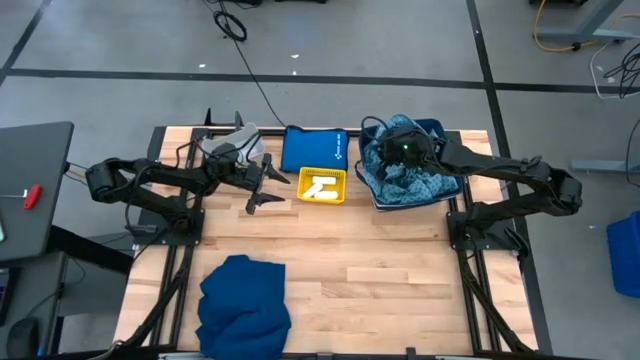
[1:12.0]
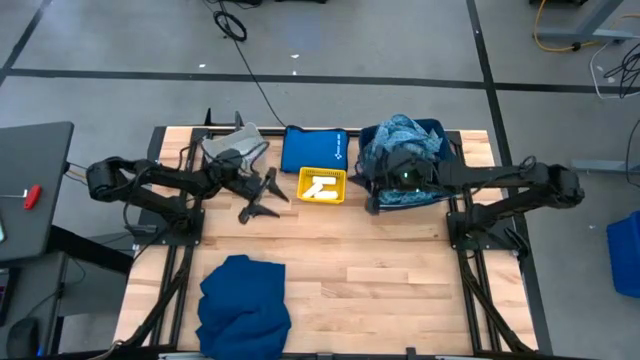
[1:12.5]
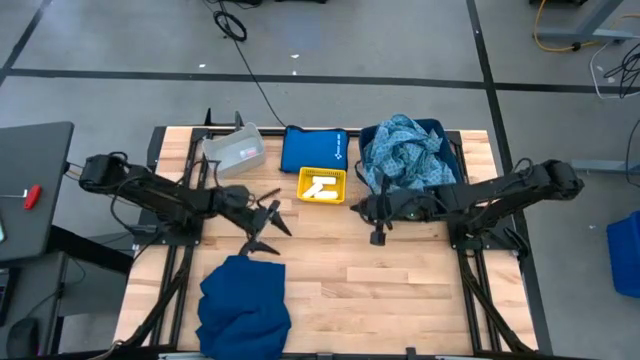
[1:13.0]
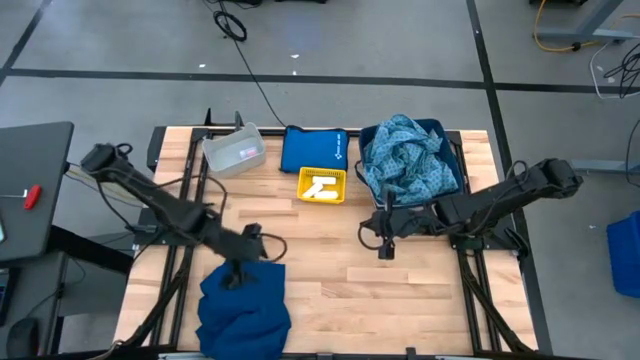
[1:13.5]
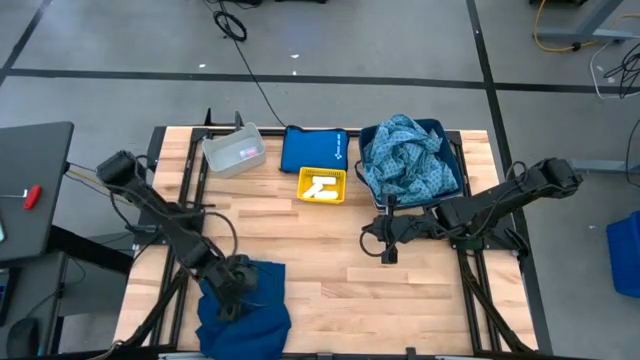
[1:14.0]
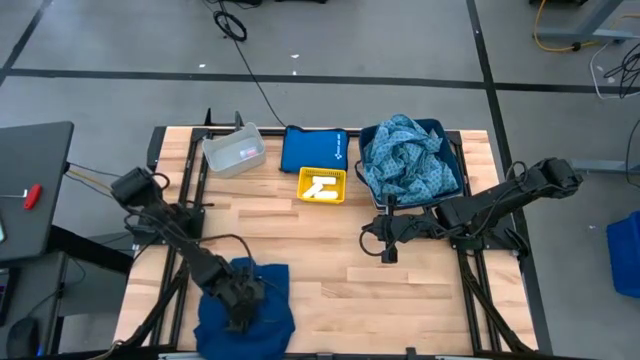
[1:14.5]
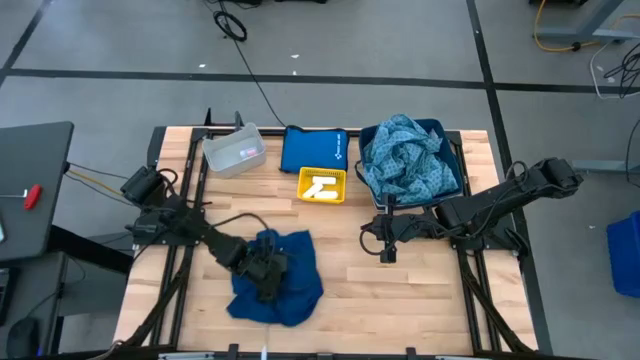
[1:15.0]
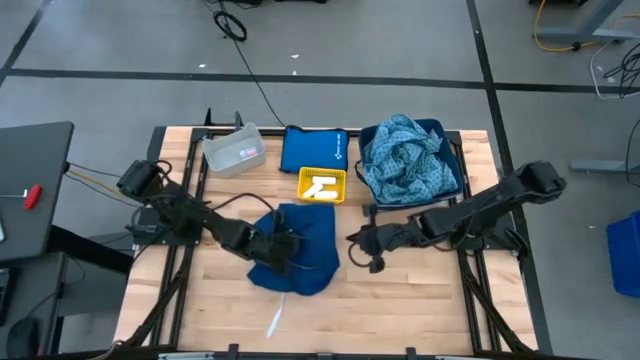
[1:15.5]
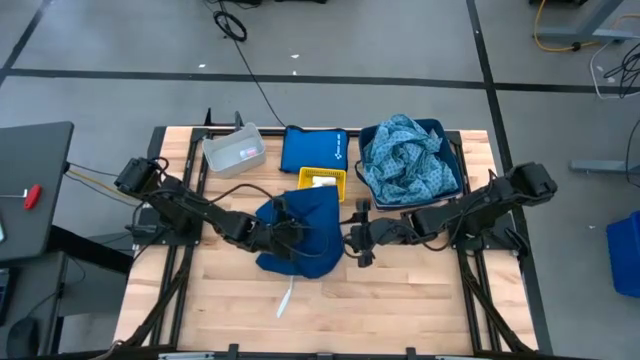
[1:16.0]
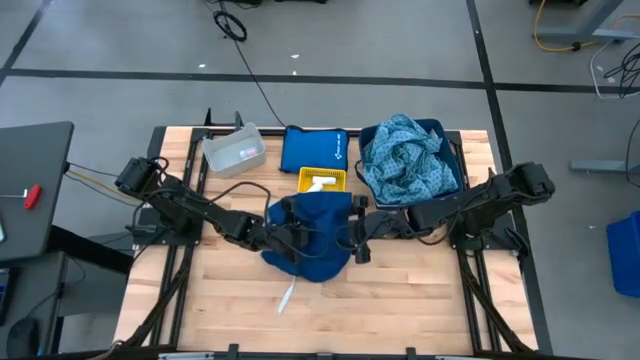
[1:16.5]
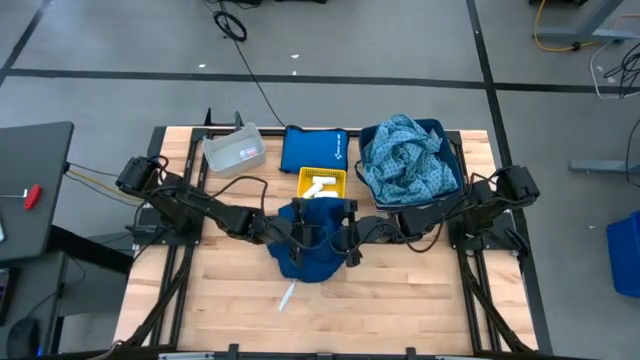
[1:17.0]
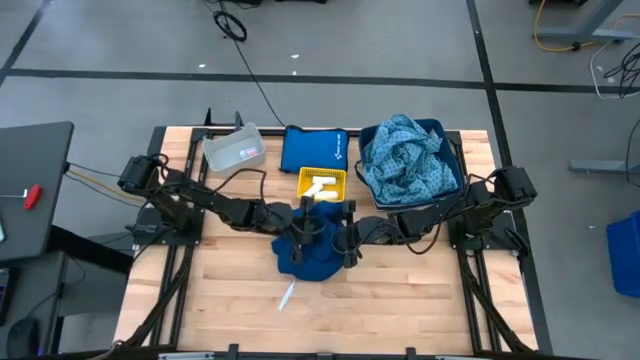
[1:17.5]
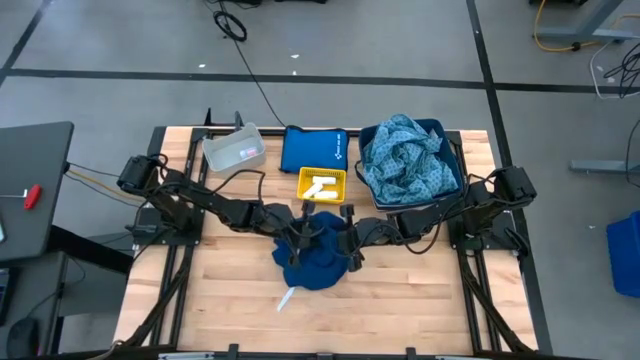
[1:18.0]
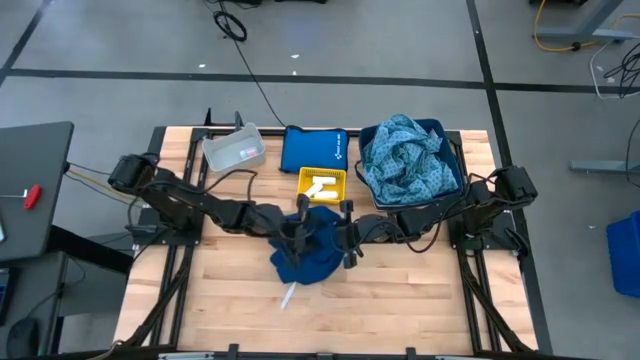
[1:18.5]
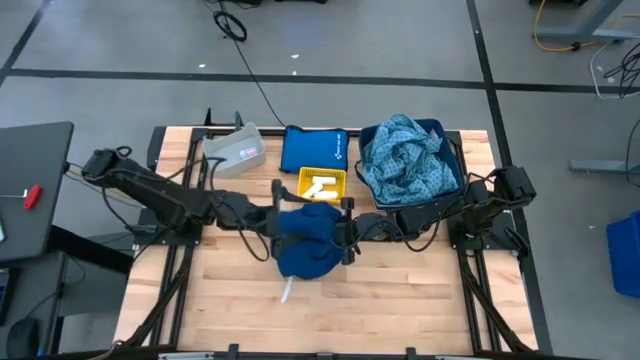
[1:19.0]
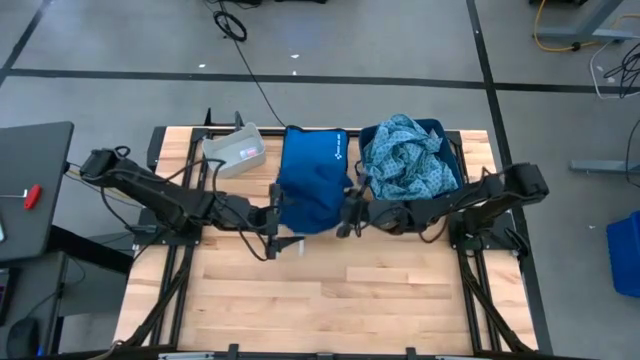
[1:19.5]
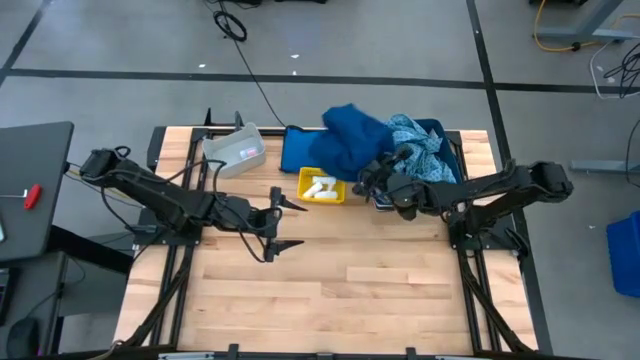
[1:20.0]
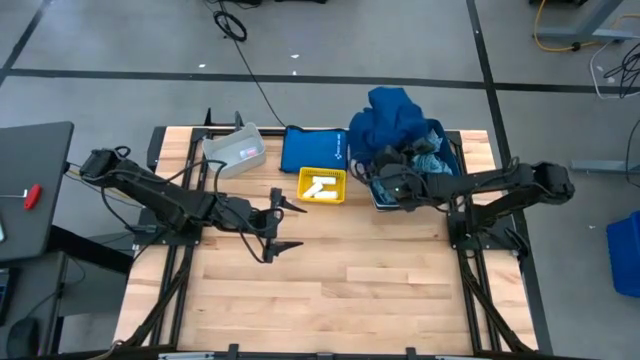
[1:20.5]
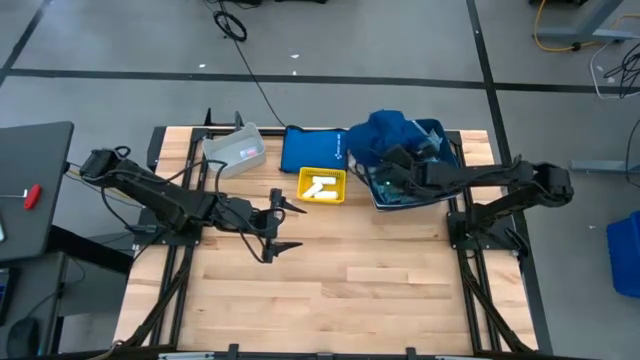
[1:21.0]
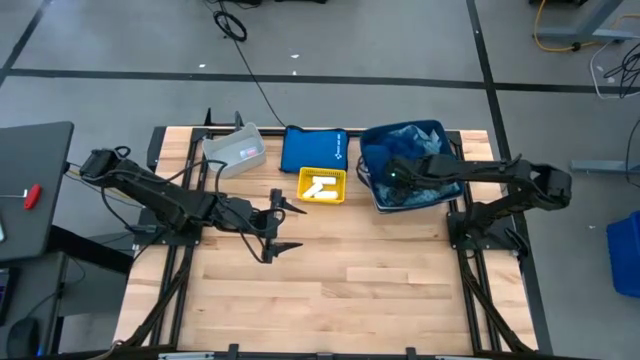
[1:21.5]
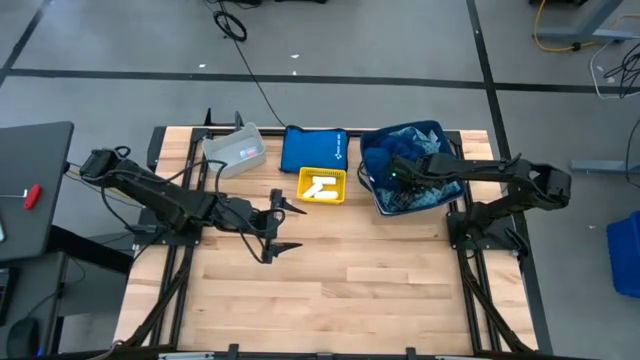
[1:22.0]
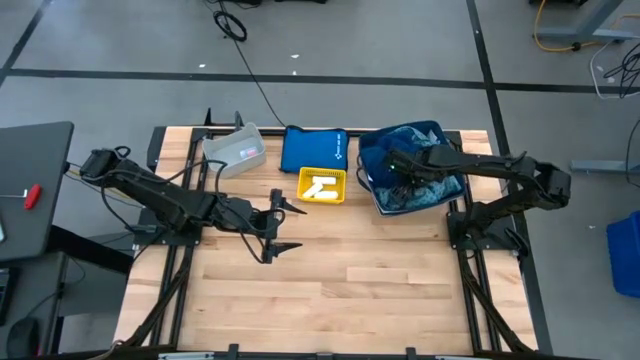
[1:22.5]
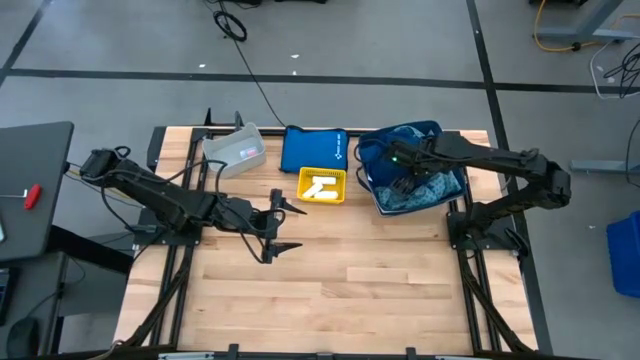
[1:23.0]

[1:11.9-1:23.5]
Task: Pick & place medical supplies in basket/bin
Put the blue patient gown into the blue bin

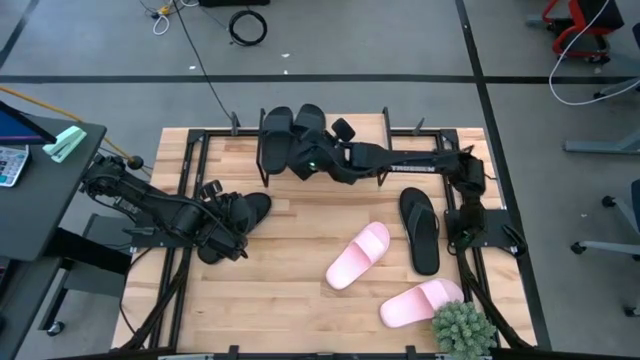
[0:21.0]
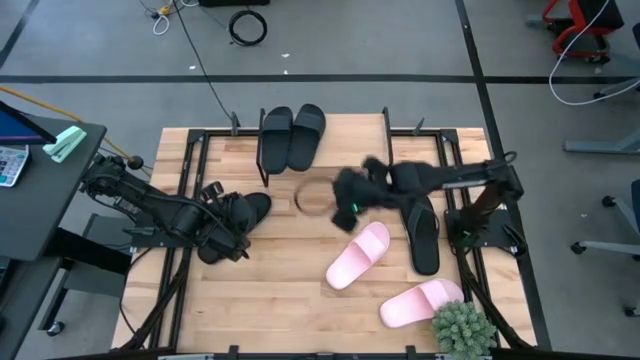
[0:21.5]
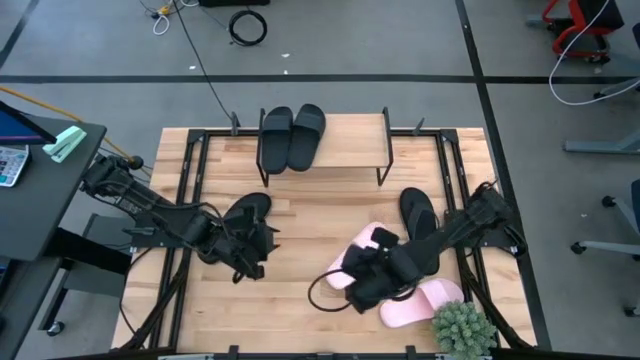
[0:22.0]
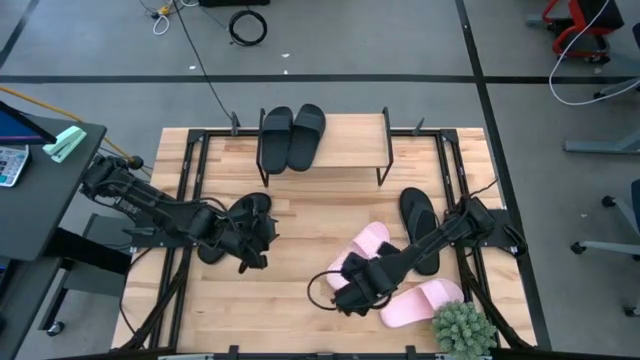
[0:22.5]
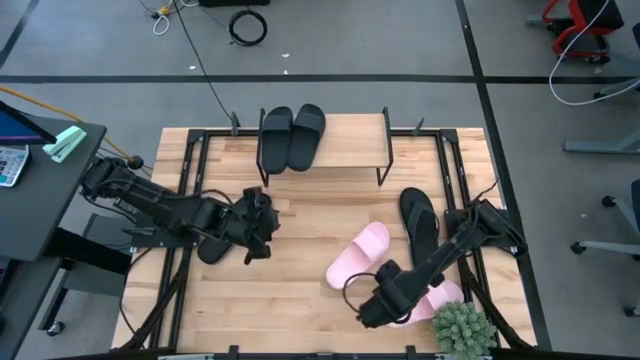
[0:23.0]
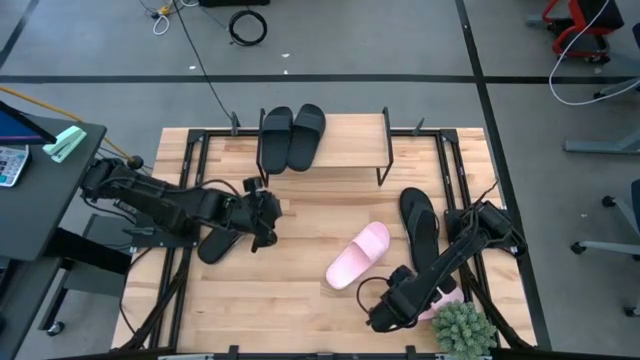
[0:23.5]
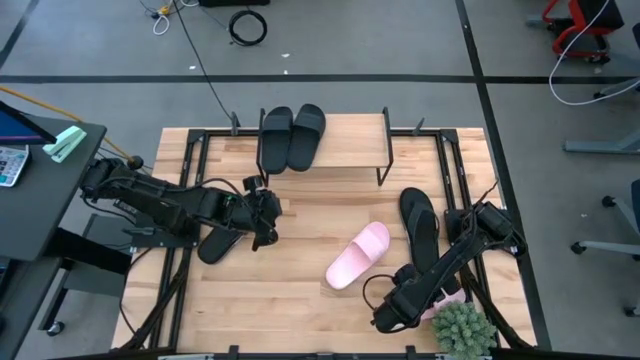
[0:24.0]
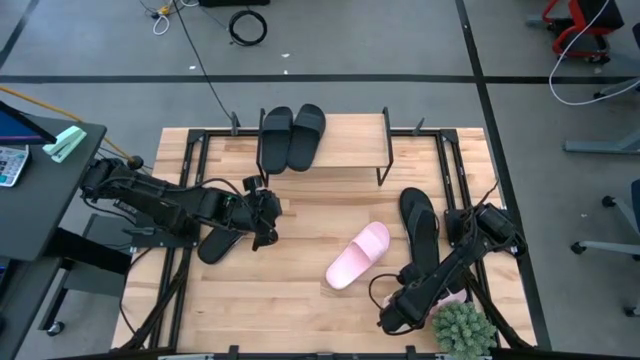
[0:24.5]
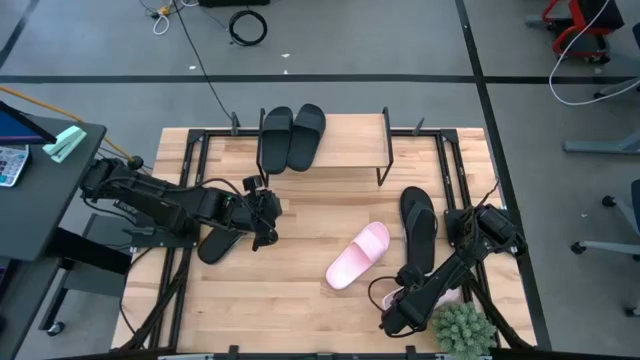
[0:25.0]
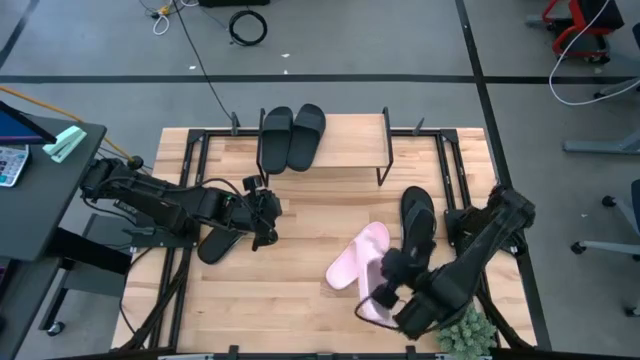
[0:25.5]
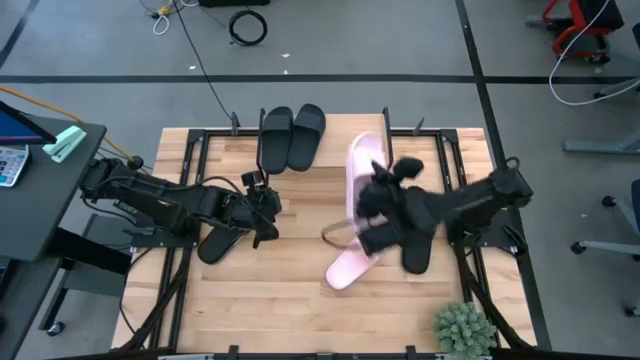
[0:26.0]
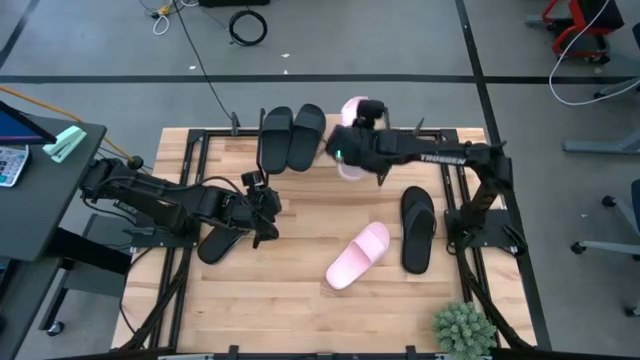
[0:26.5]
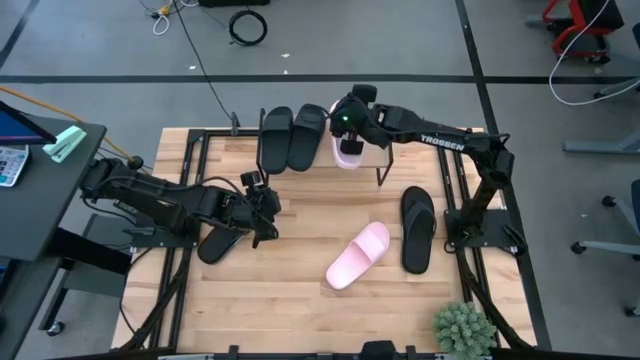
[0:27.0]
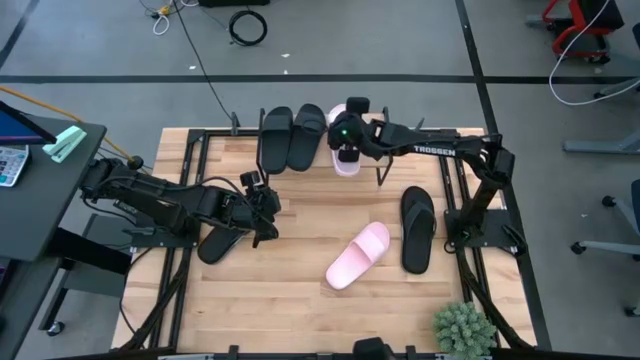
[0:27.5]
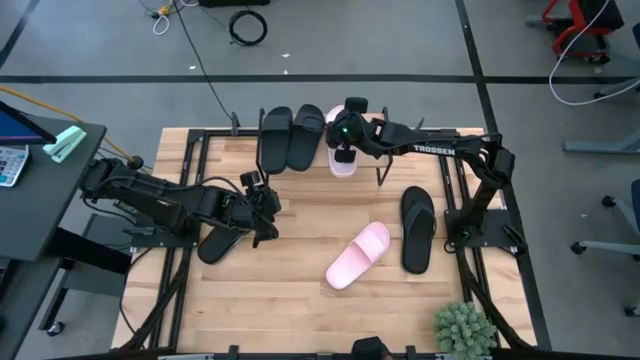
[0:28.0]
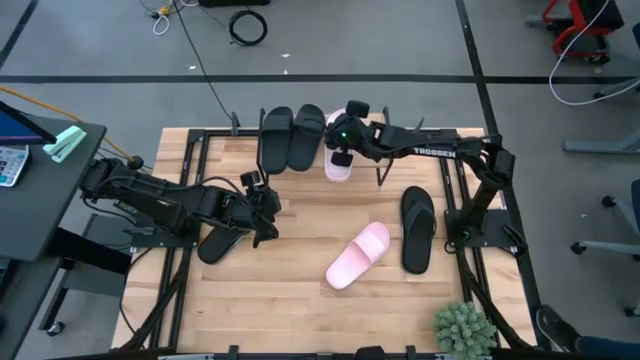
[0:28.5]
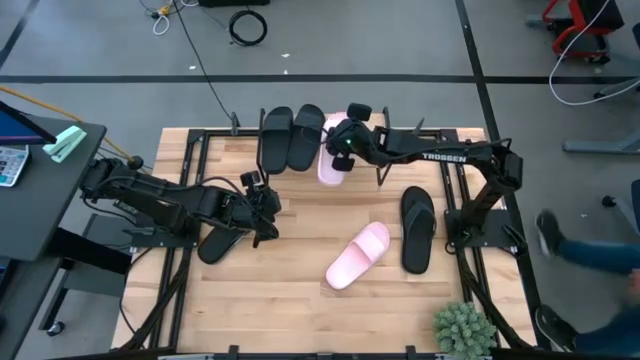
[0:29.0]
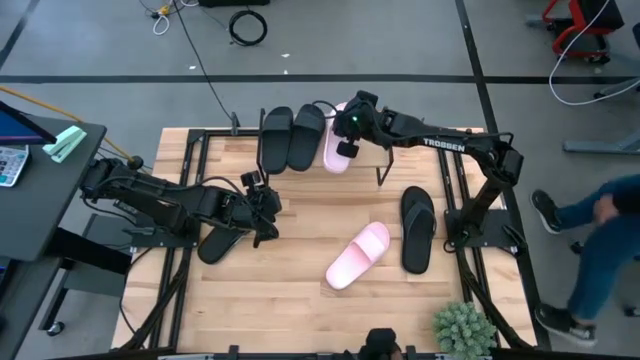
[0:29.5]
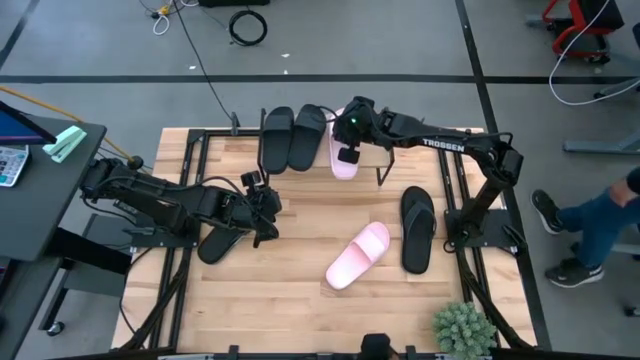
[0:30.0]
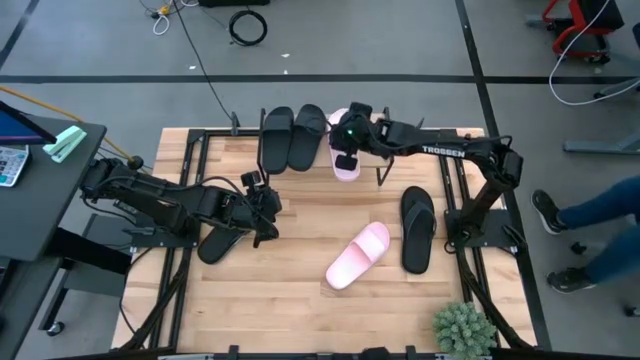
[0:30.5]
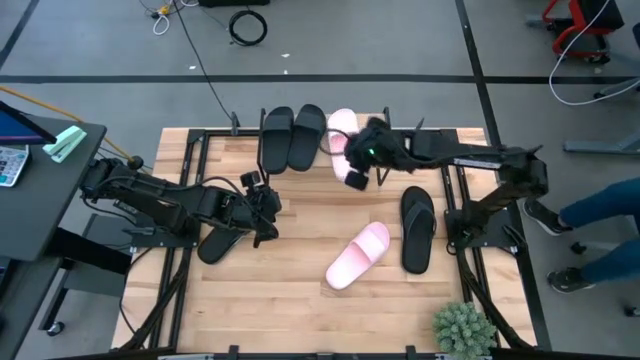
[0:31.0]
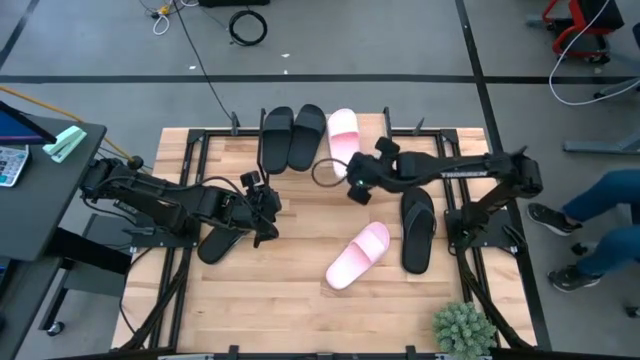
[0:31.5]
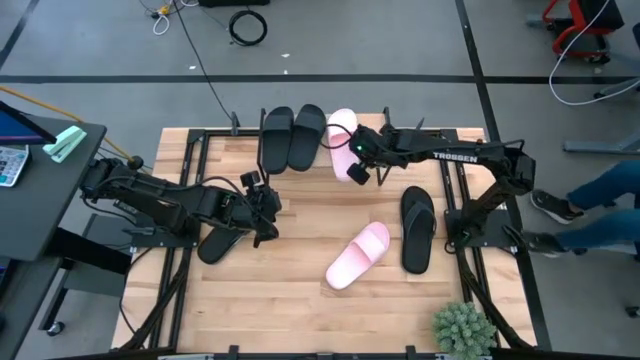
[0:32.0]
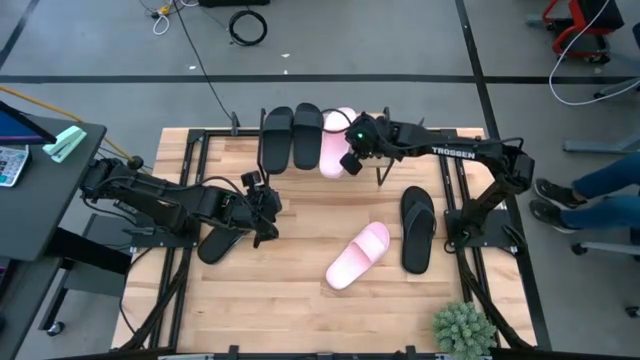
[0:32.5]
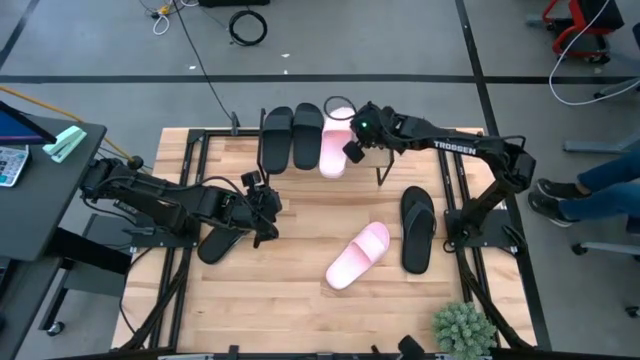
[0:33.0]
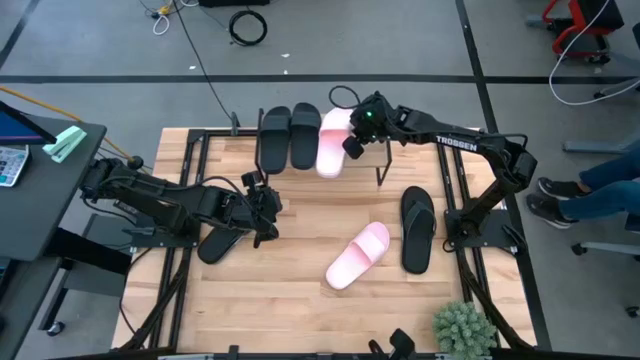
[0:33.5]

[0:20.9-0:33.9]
Task: Pick and place slides into the shelf
Put the bottom pink slider on the shelf
